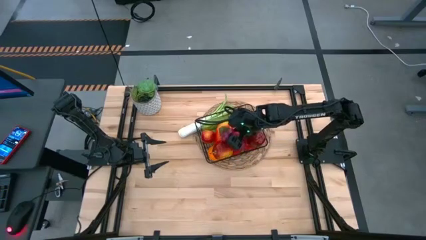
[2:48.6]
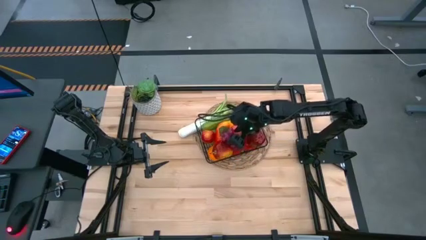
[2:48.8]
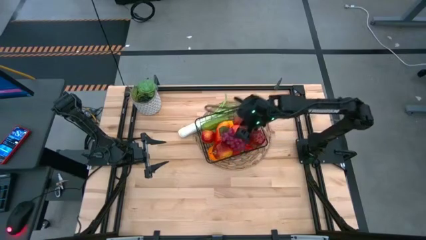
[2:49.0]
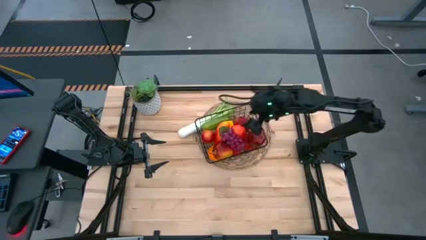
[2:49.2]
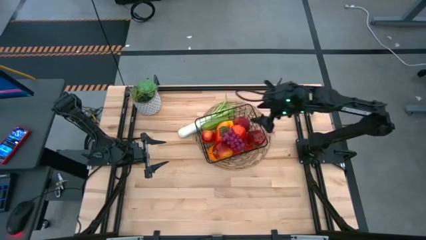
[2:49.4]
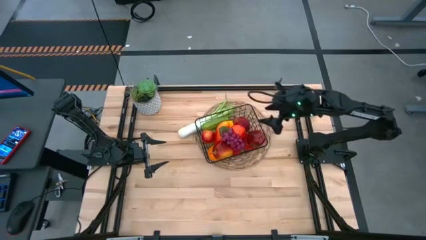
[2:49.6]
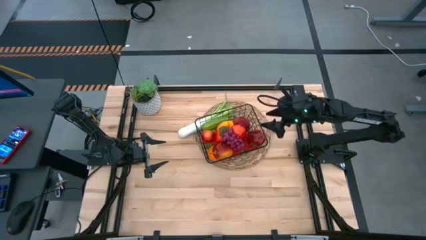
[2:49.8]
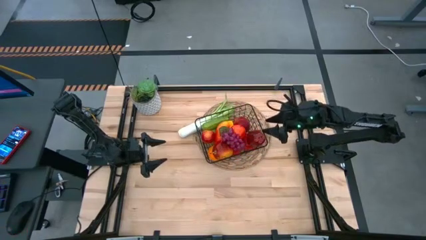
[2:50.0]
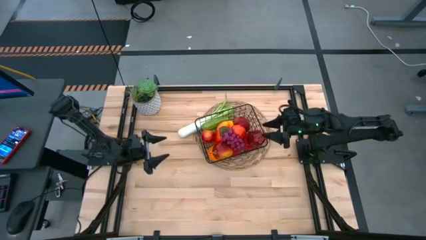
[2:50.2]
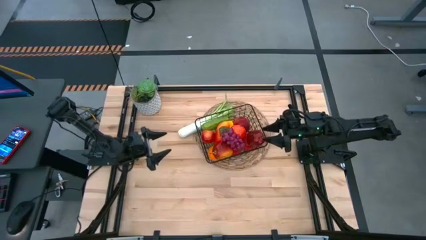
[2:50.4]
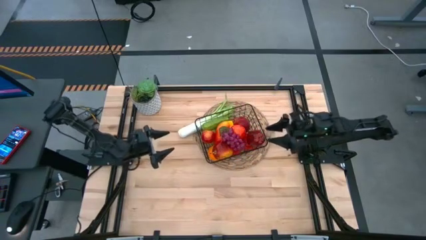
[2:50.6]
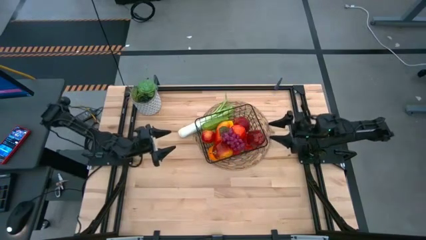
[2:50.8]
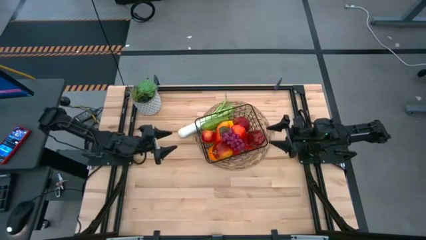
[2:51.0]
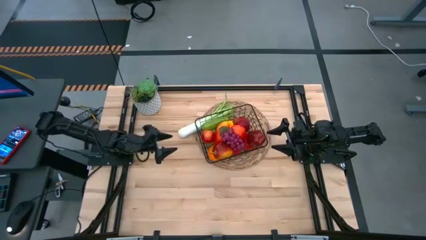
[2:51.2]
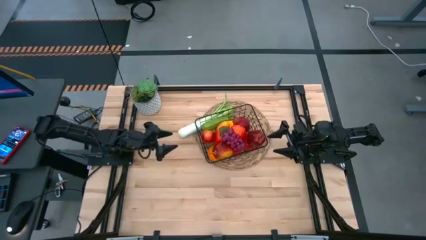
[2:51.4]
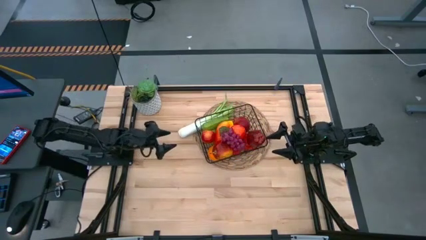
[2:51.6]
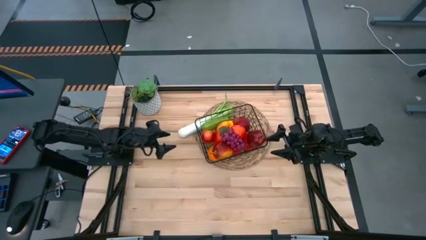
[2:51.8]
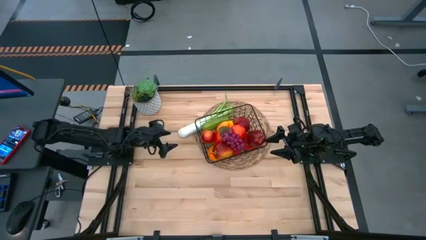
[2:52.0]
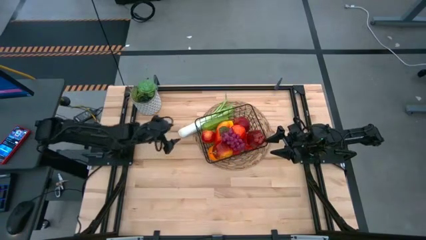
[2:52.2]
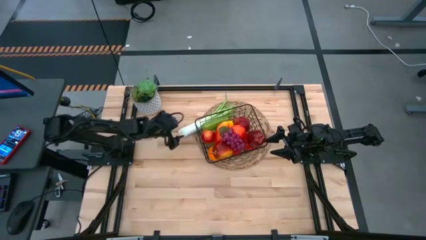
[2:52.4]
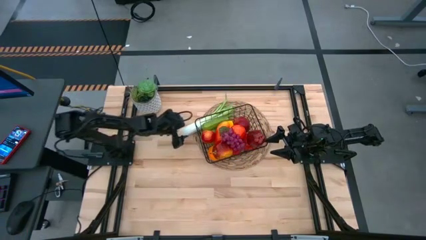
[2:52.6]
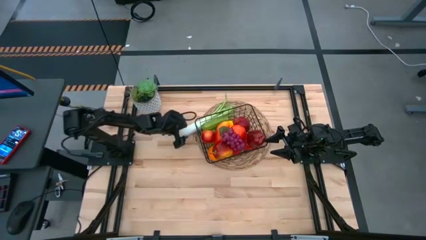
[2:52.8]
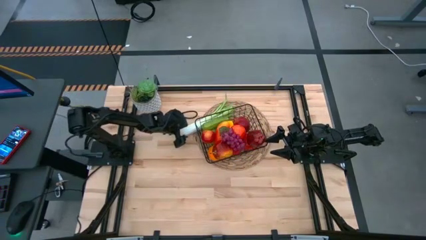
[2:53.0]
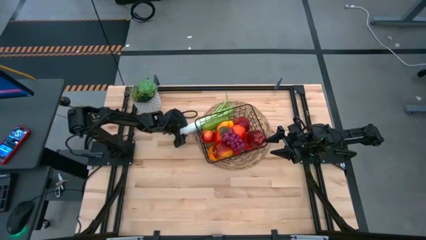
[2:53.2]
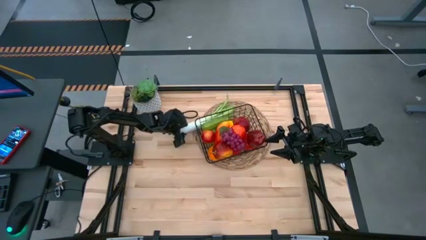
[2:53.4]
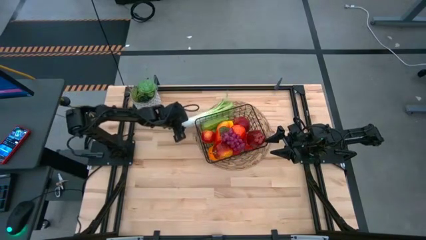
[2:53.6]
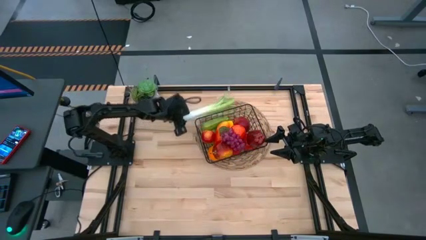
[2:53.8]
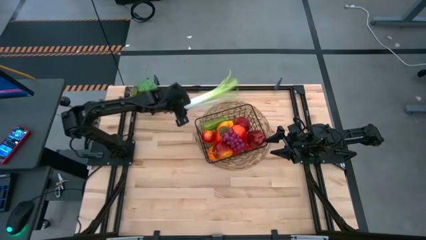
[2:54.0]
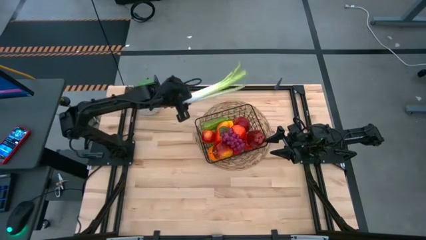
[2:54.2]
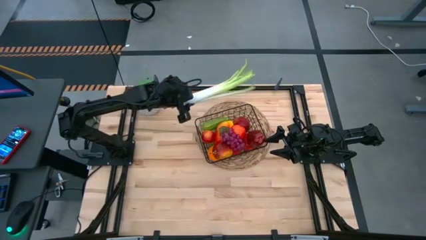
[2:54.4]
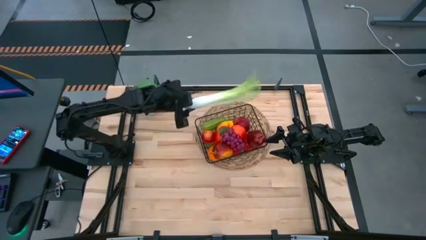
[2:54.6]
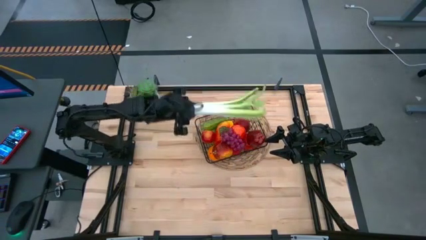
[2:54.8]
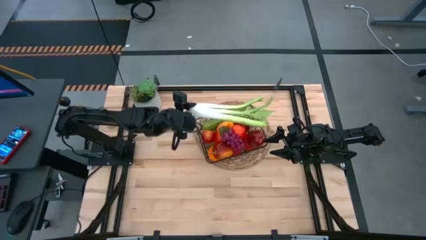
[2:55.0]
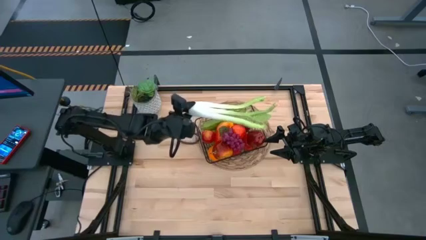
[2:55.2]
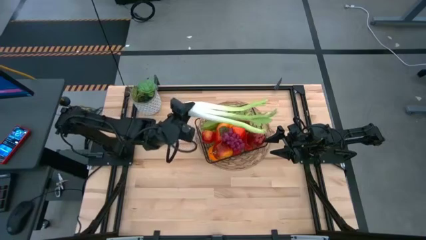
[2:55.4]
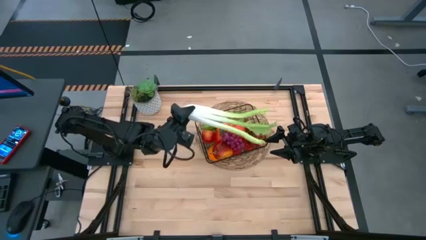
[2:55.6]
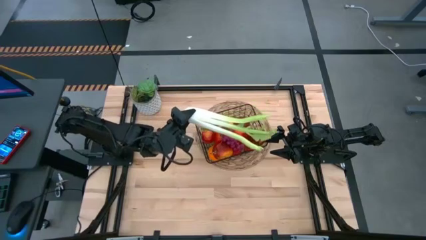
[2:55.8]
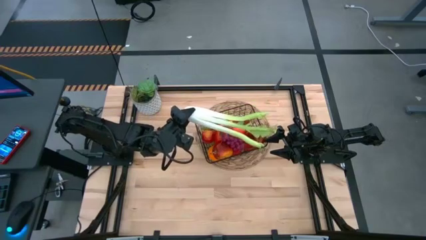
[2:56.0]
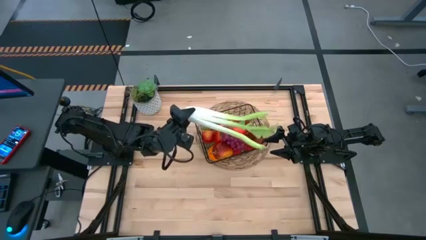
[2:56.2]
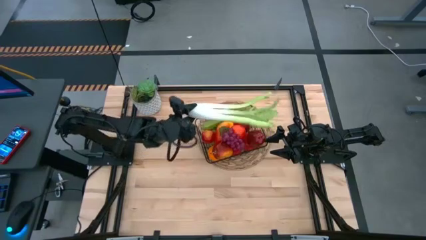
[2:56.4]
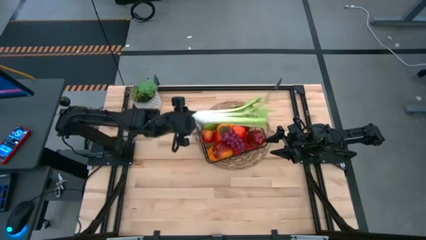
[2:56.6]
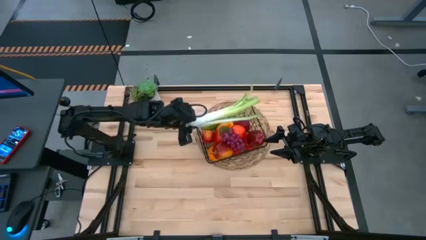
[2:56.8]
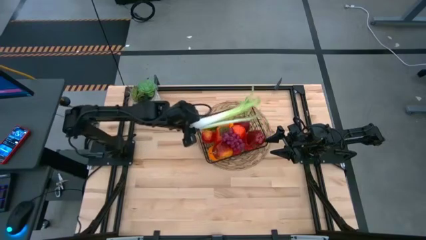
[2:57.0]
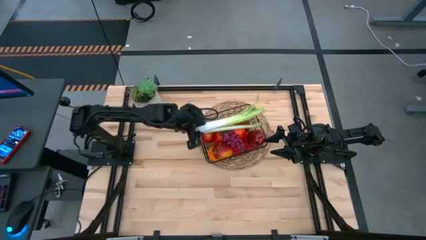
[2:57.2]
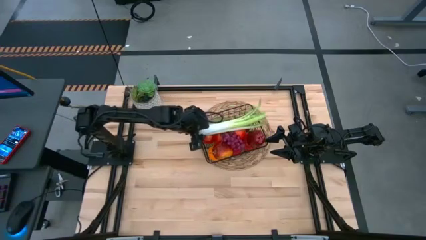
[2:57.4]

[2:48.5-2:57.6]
Task: Build produce basket
Put the celery into the wire basket

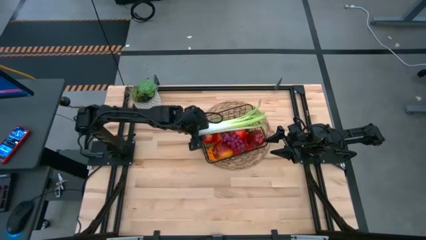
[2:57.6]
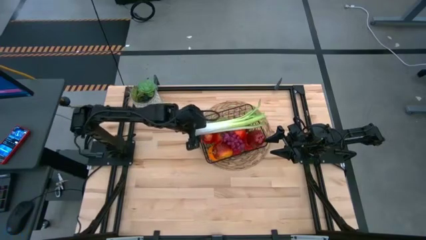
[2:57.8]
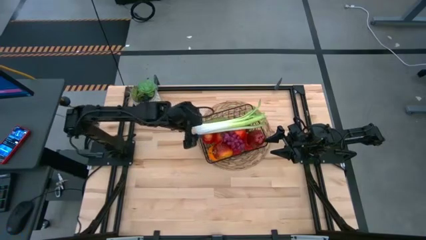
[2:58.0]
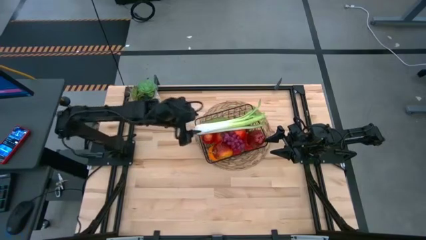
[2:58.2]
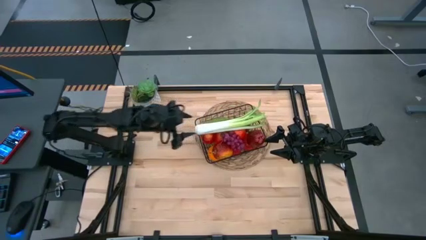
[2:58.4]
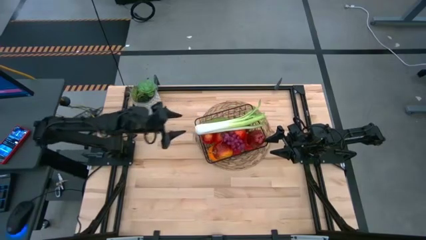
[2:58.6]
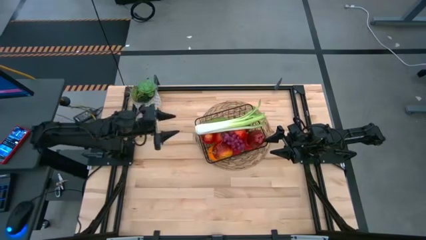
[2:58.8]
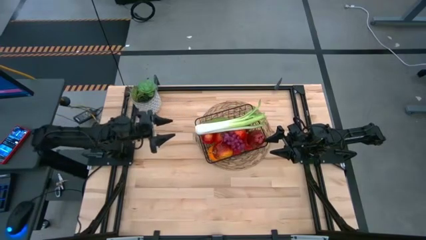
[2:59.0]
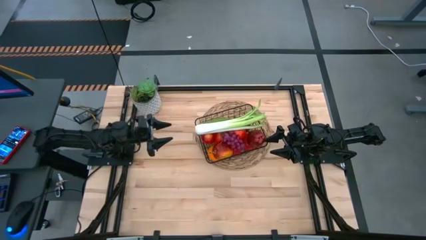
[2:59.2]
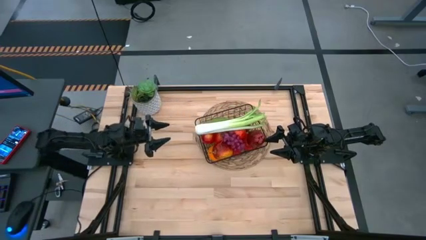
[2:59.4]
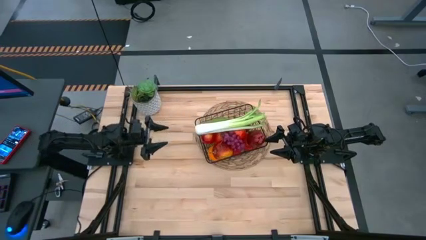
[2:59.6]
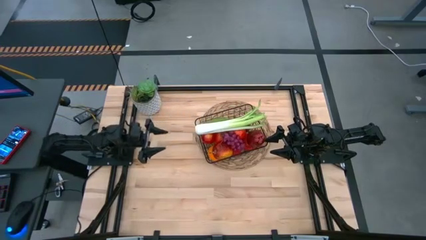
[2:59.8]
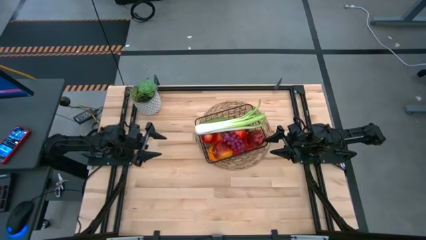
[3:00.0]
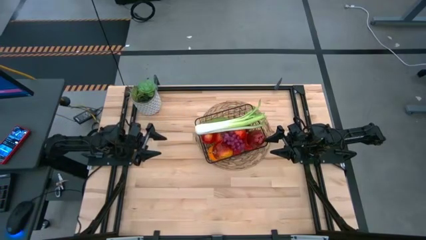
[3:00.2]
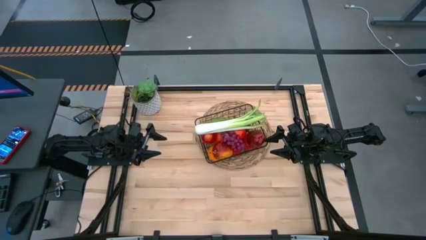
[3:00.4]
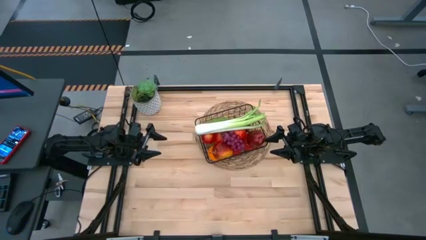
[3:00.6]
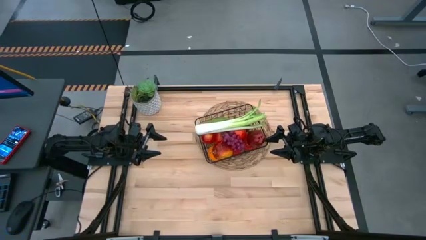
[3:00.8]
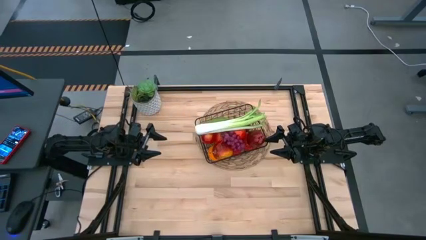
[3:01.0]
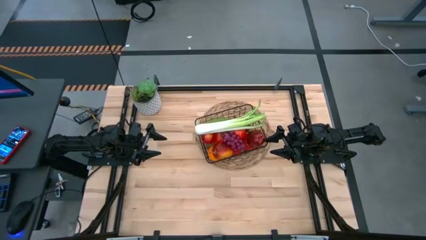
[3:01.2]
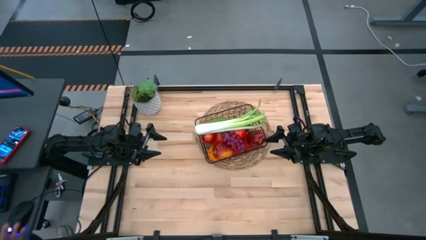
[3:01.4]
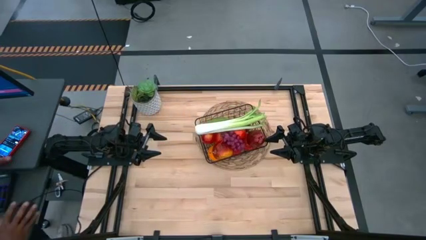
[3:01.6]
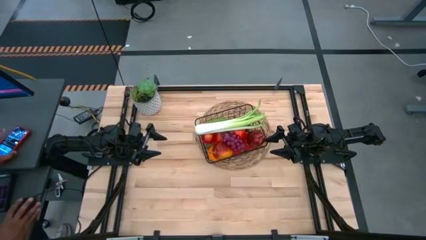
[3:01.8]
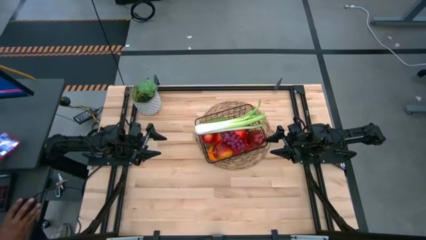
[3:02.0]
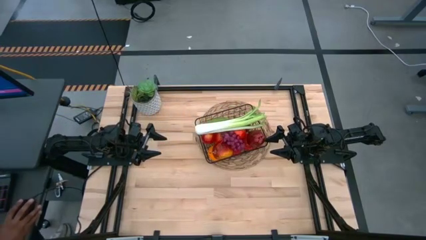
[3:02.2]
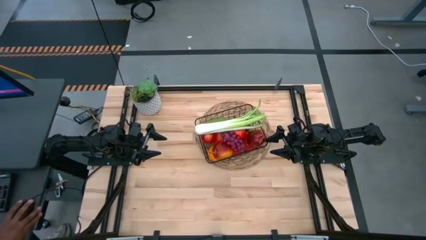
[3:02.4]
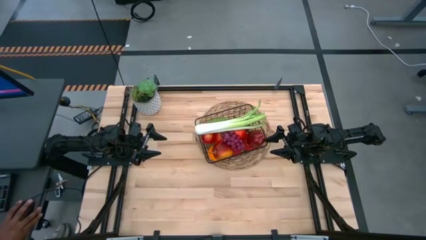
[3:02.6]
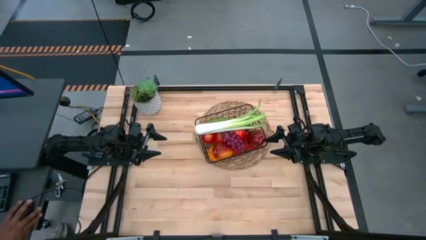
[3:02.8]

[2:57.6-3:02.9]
Return to Home Position

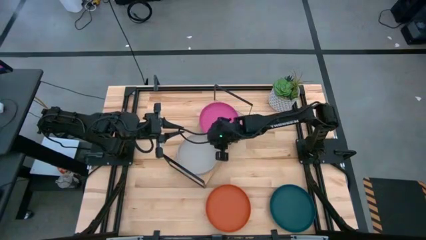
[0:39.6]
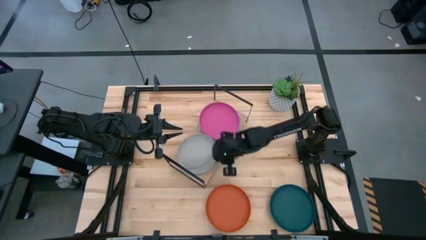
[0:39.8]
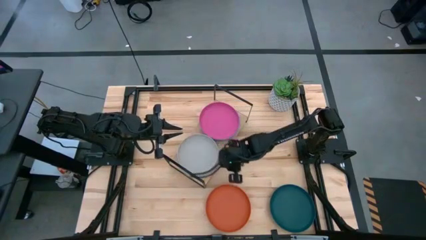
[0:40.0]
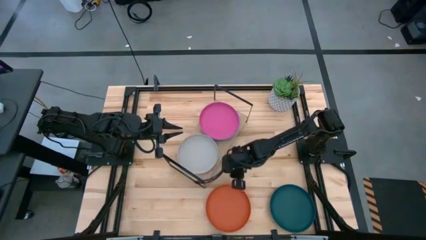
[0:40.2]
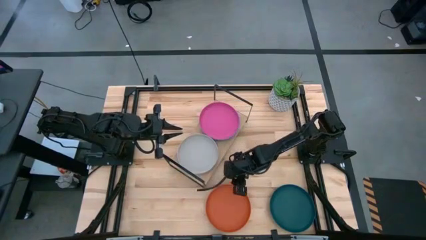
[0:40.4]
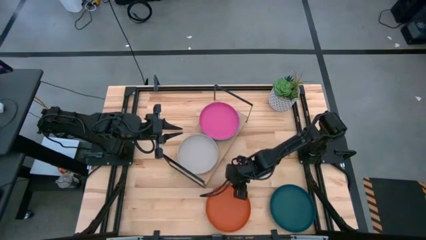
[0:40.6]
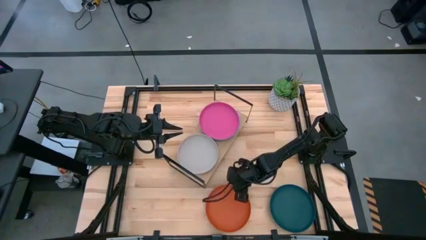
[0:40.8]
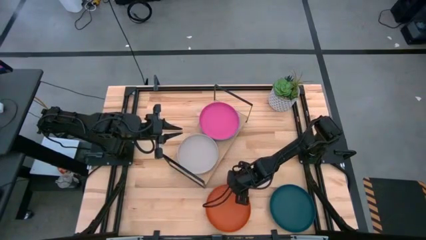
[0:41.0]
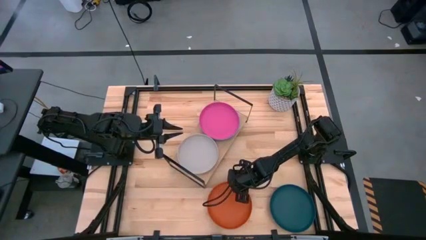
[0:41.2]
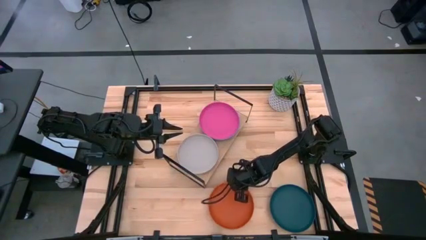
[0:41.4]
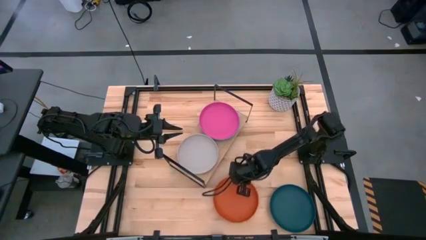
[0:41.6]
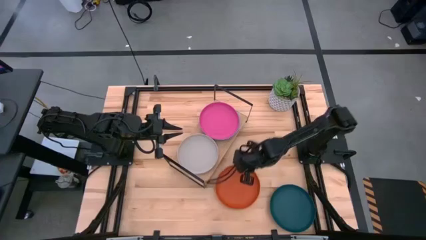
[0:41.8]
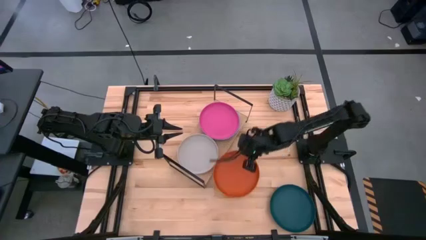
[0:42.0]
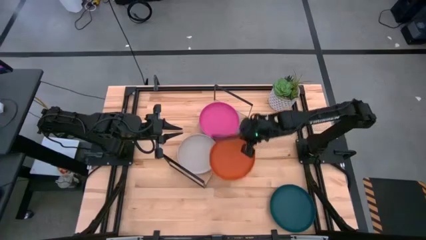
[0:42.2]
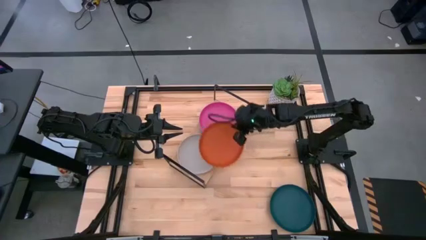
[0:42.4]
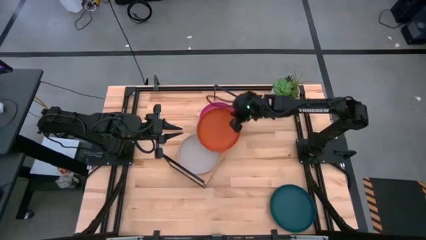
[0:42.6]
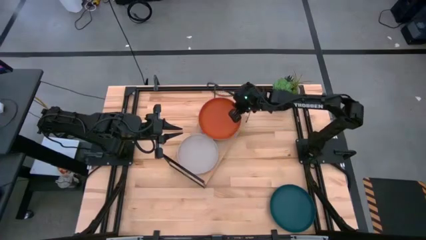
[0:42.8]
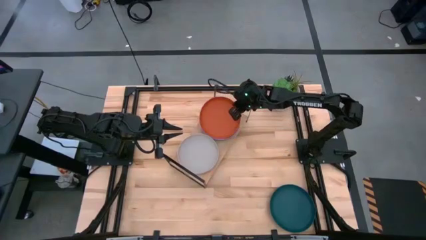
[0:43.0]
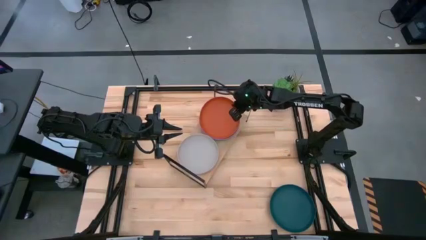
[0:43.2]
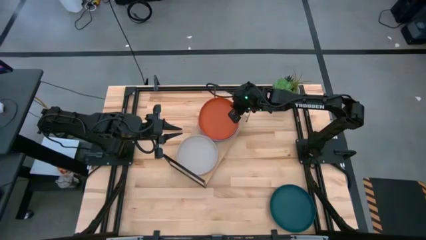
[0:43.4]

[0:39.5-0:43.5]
Task: Place and stack plates onto a shelf
Stack the orange plate on top of the pink plate on the shelf
